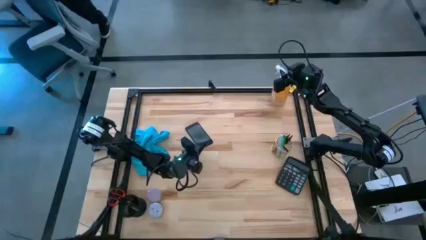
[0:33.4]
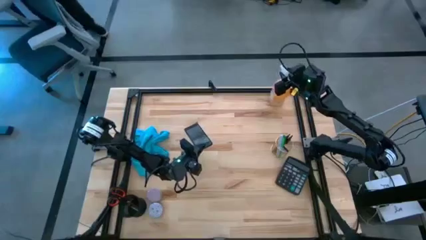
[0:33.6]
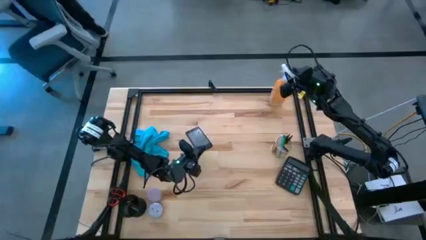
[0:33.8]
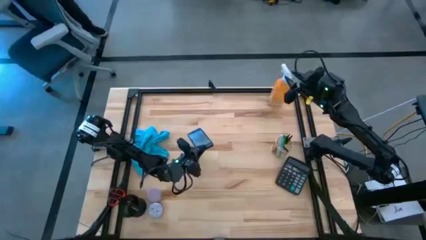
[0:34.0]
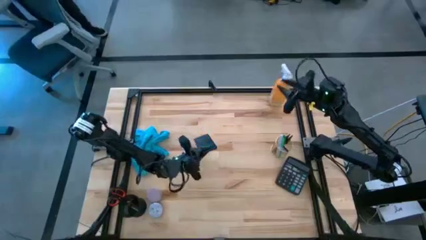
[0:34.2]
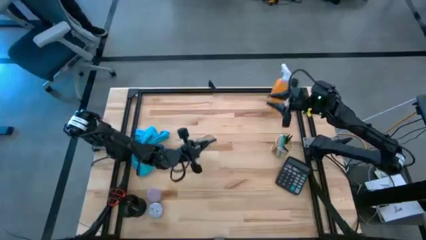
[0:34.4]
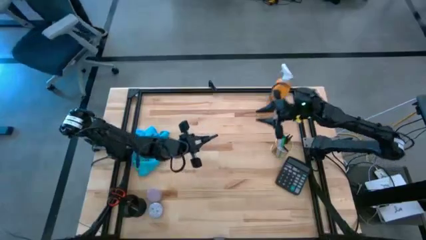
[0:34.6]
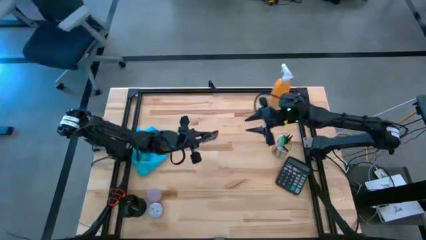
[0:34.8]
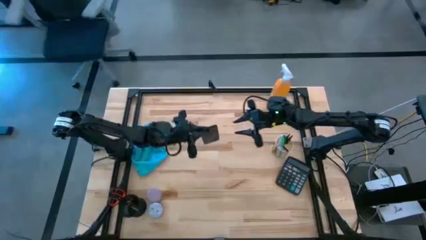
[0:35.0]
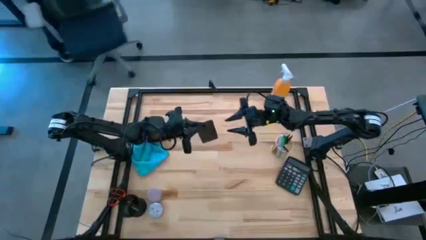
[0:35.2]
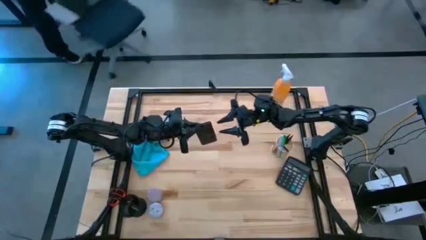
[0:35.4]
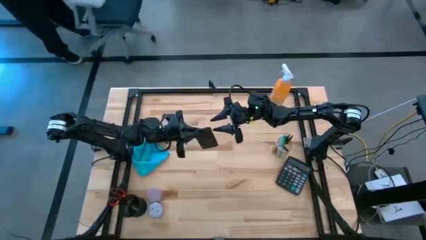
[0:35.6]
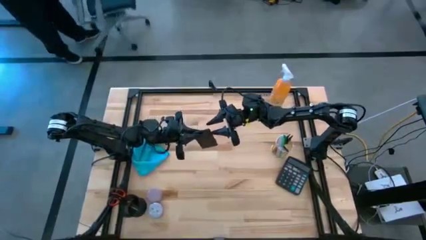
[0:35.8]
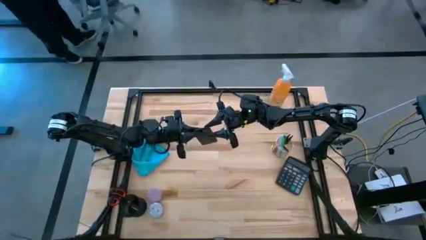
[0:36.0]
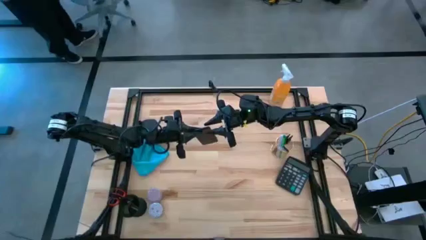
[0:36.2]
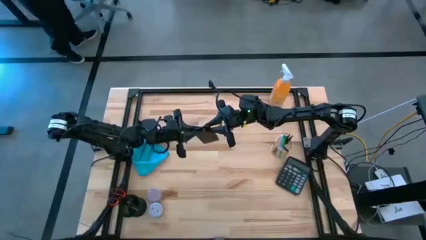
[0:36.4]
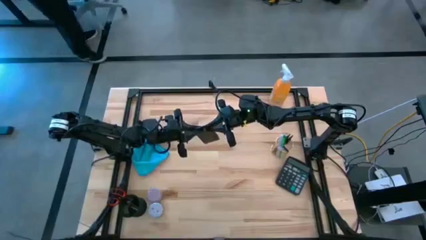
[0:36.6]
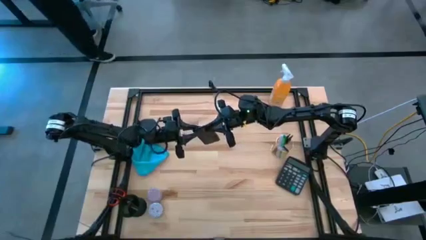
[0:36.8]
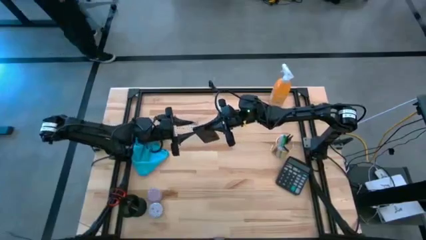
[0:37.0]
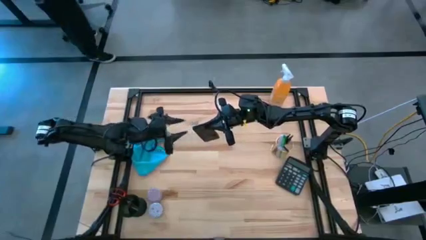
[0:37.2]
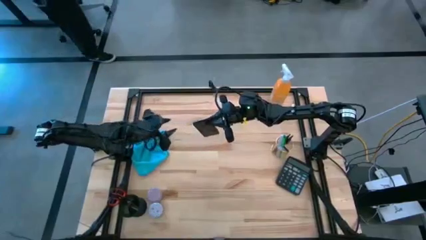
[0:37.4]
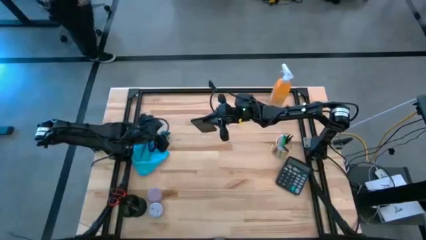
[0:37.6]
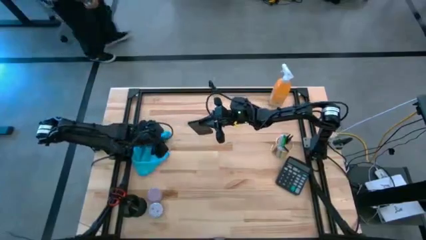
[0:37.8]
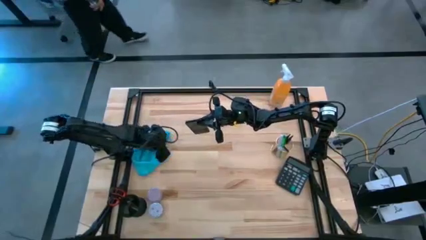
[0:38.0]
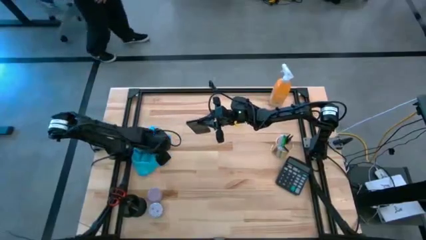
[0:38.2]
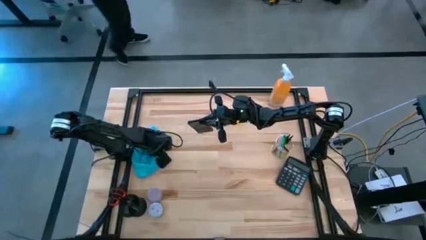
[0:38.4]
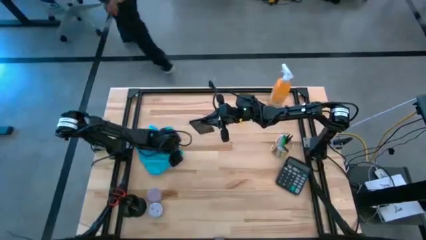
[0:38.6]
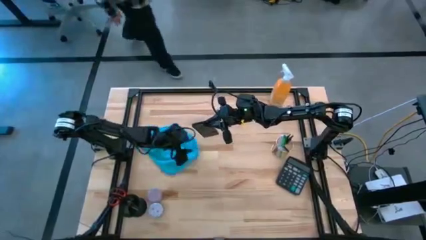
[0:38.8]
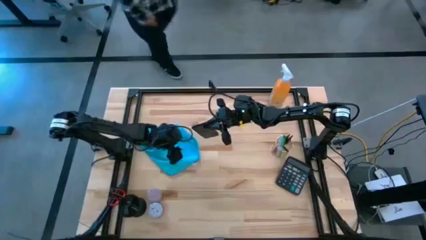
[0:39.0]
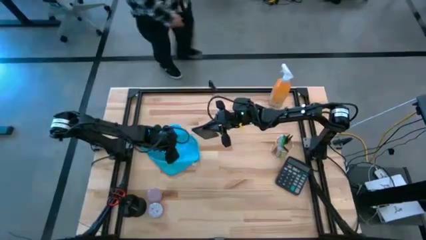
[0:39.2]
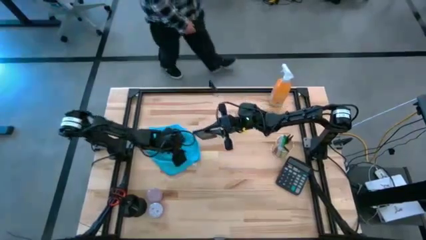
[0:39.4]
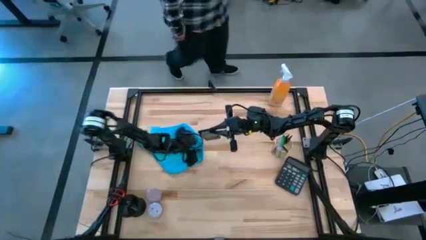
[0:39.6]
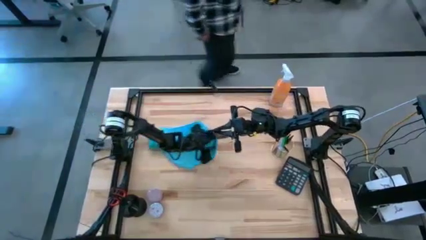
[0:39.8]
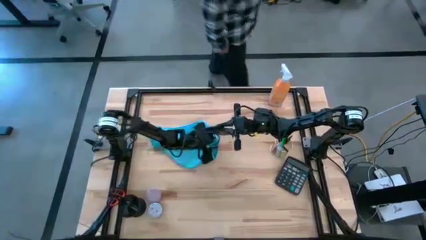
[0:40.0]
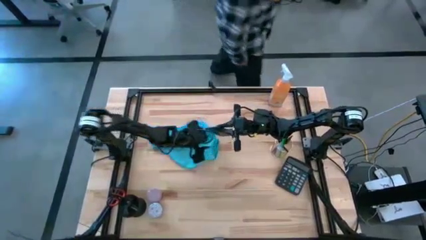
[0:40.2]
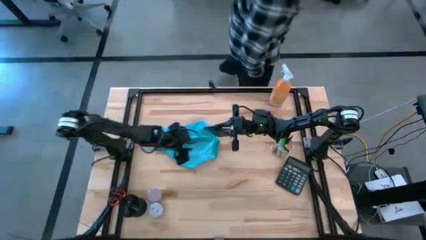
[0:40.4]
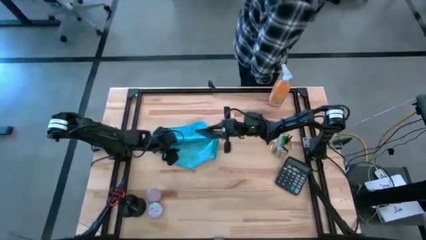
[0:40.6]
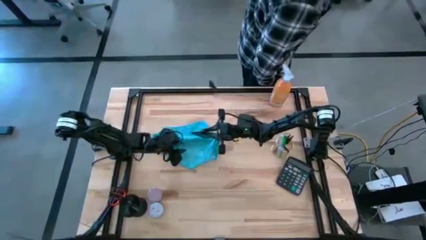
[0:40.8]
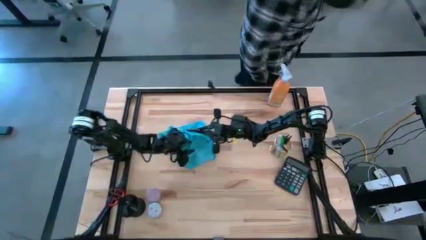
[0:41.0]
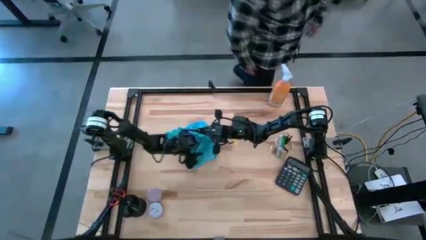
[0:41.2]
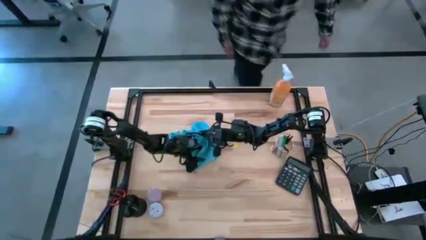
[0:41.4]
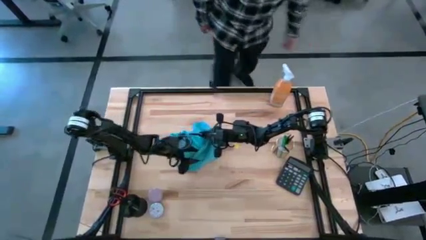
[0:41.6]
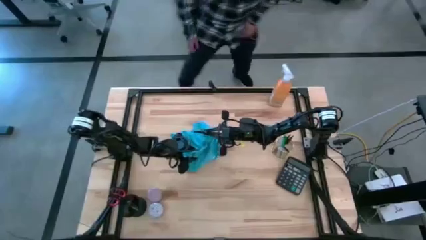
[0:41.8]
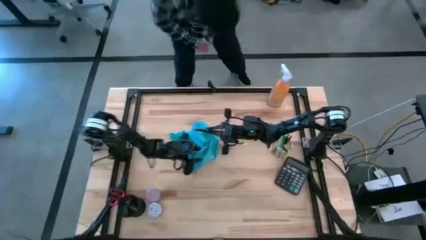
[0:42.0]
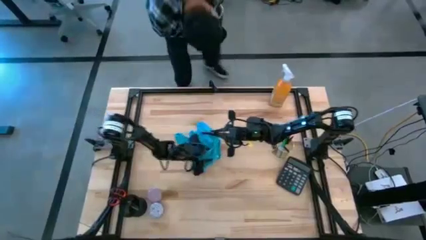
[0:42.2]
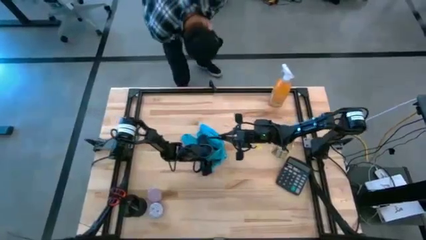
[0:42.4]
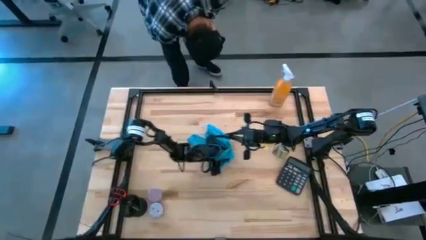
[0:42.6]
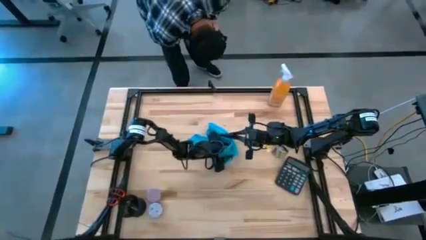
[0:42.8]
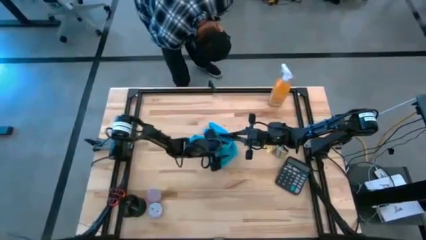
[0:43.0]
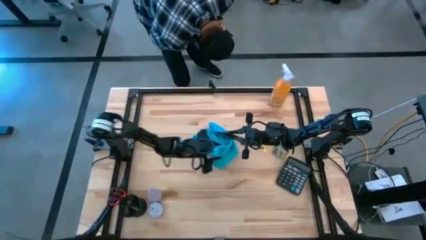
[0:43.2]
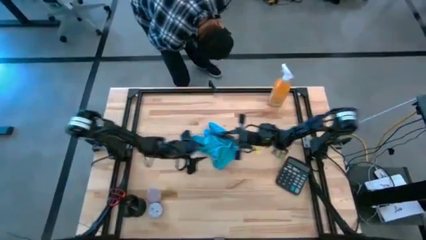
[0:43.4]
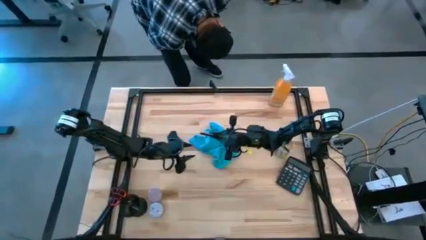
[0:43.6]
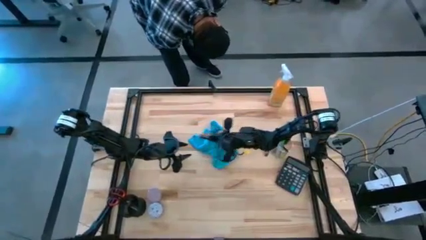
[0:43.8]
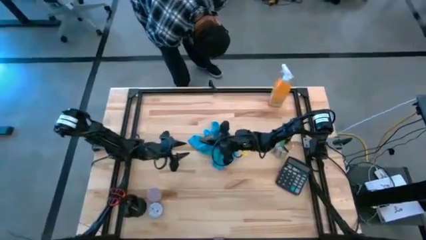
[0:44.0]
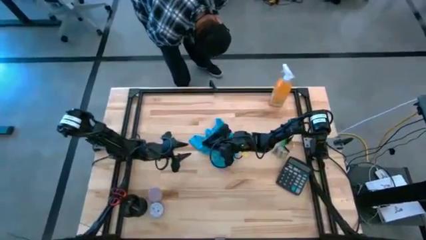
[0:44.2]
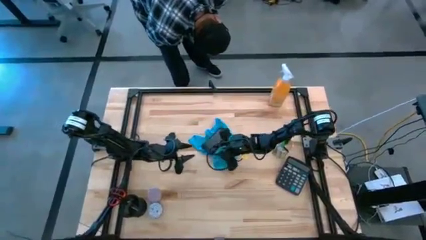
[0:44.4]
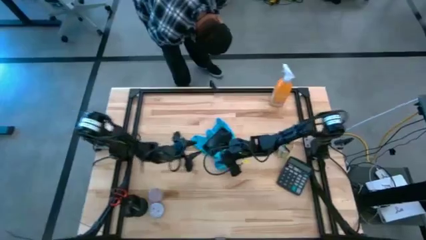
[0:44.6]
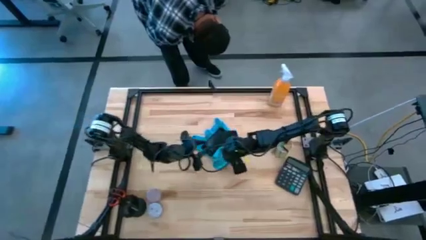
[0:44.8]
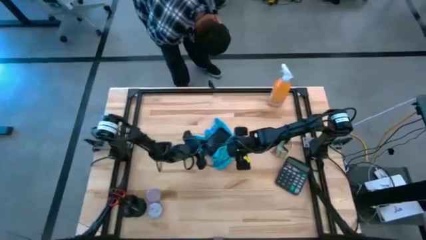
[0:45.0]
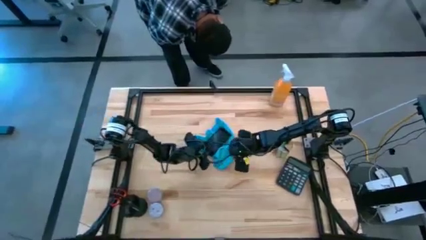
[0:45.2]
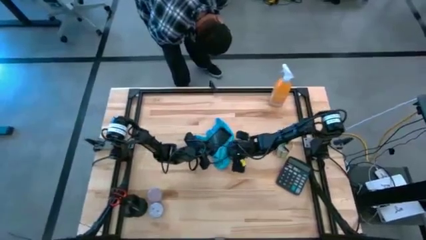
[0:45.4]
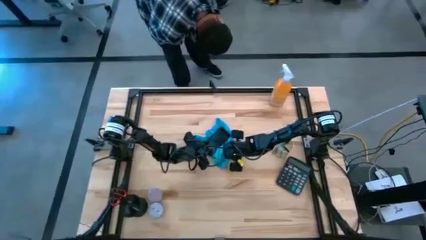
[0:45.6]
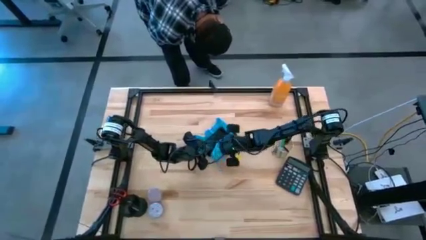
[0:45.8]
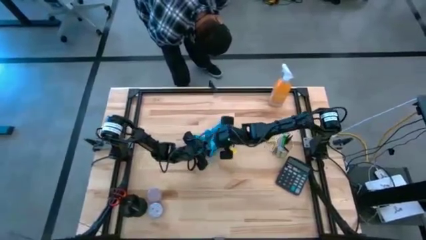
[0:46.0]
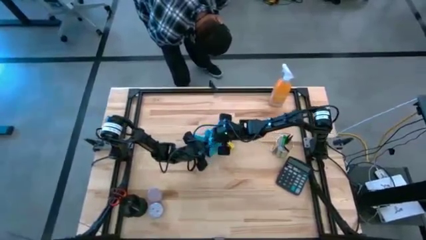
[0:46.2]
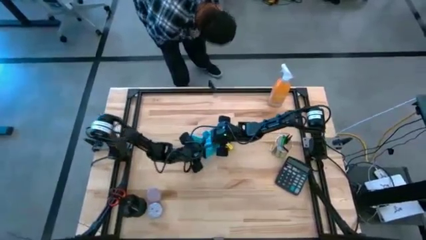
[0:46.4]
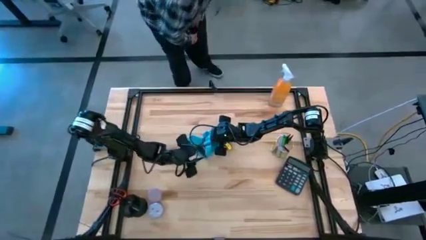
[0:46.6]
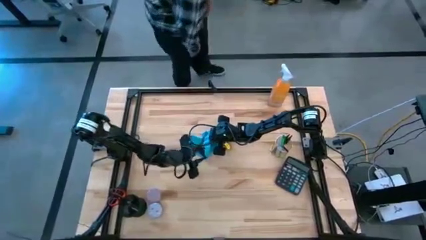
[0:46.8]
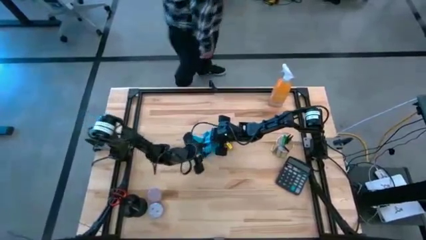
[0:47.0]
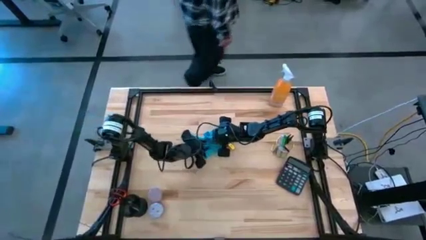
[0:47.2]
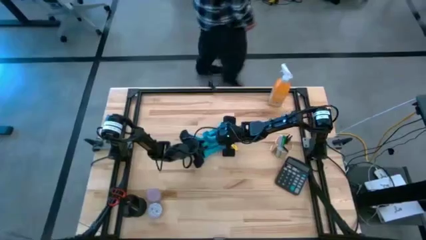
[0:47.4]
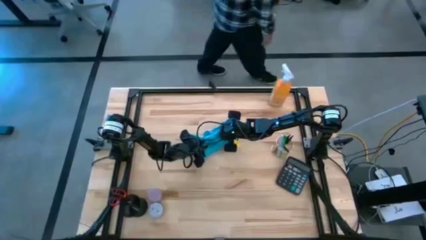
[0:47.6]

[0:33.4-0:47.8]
Task: Apply microfiber cloth
Wipe the front and back of the black cellphone using the blue microfiber cloth
